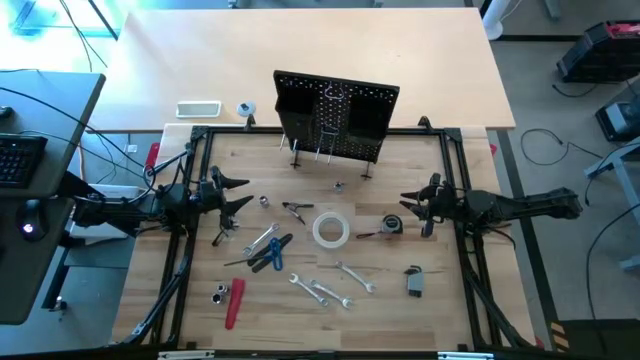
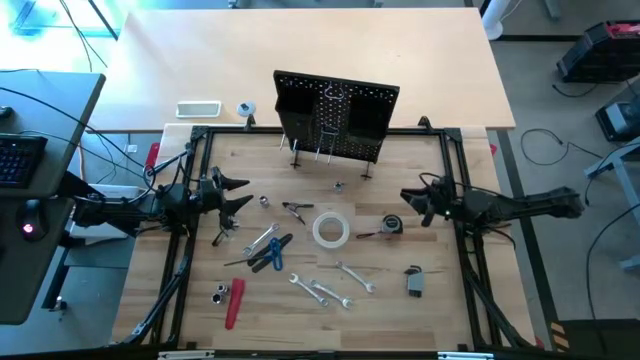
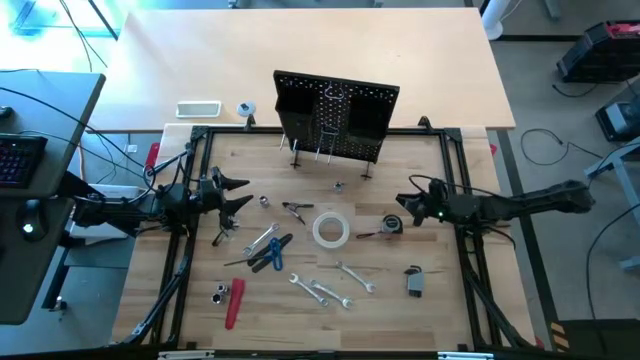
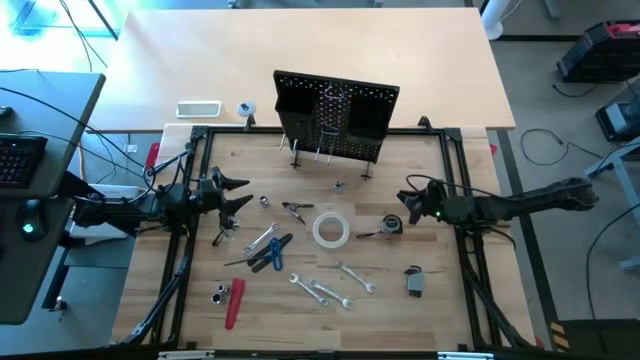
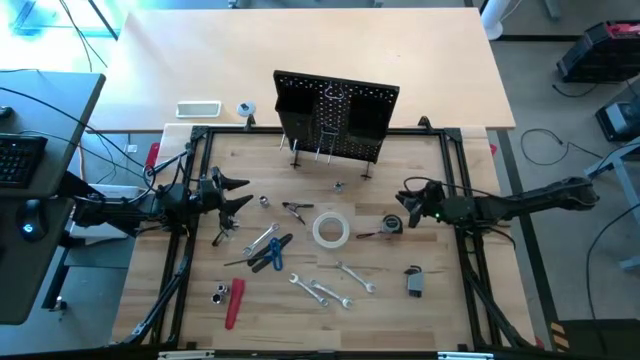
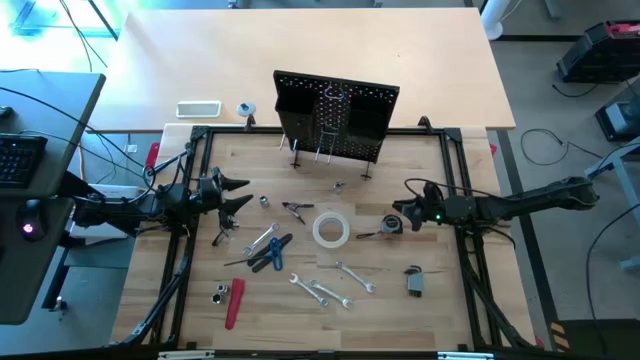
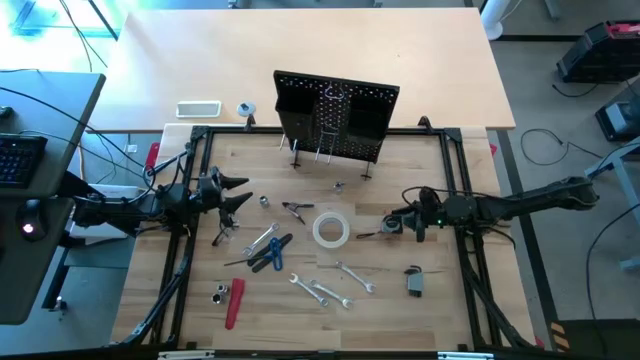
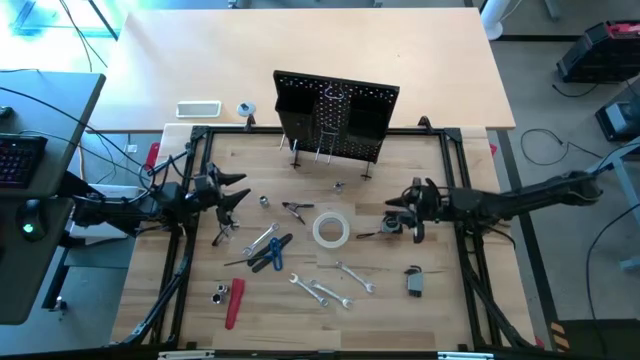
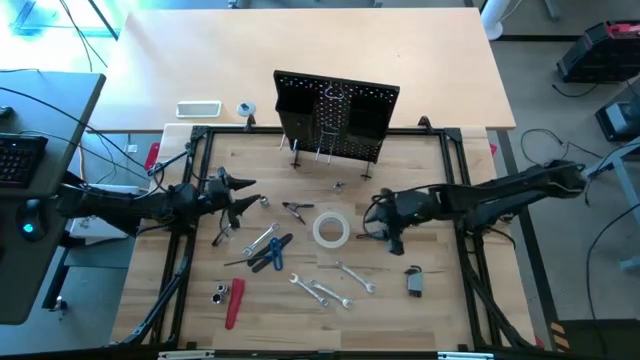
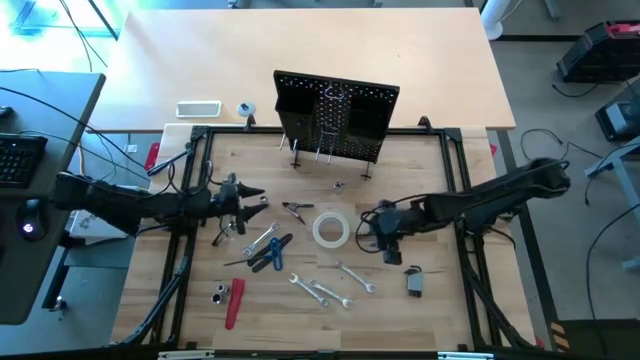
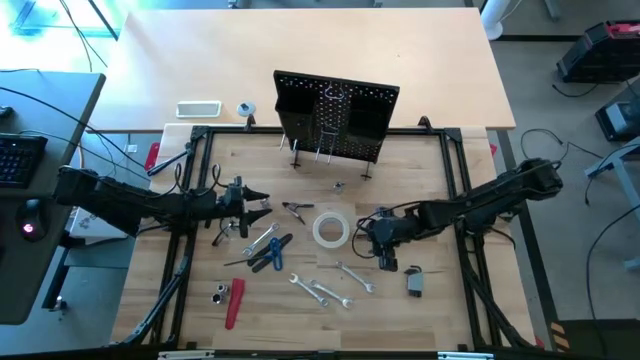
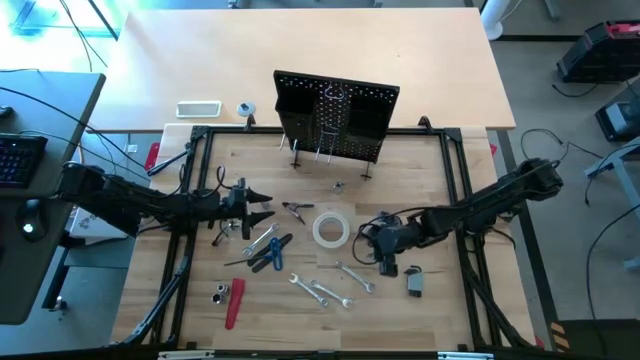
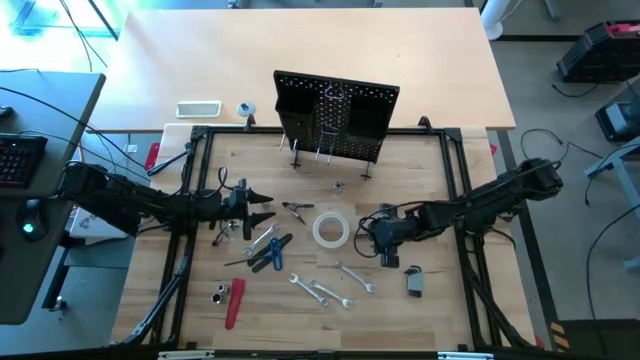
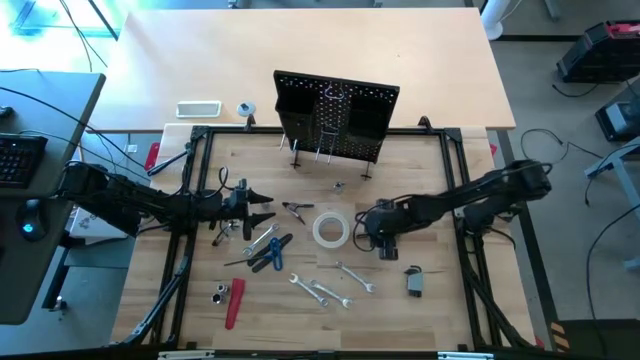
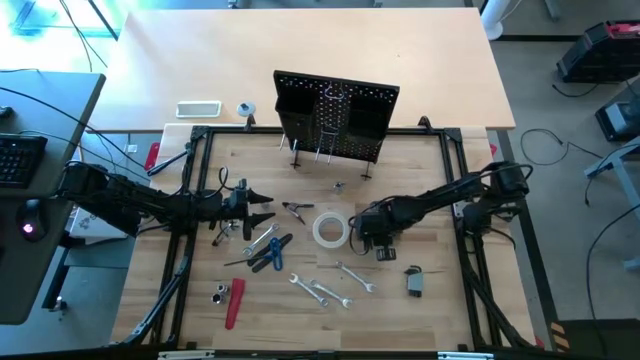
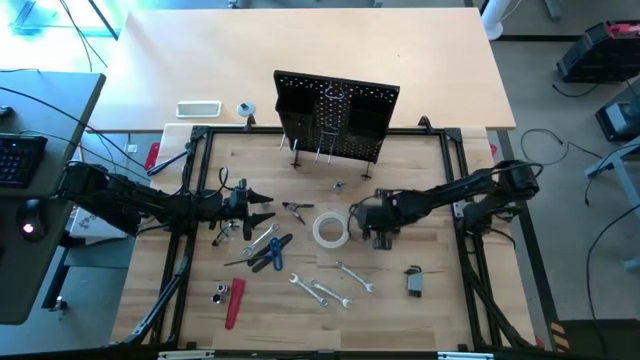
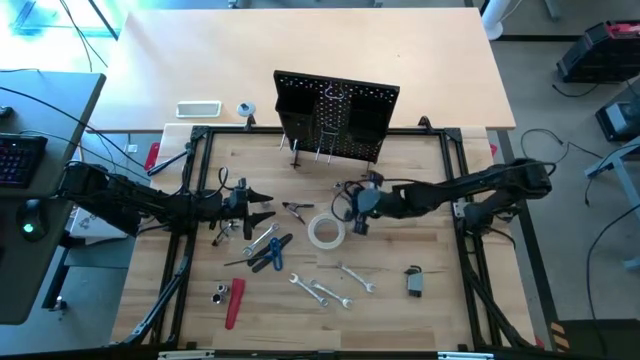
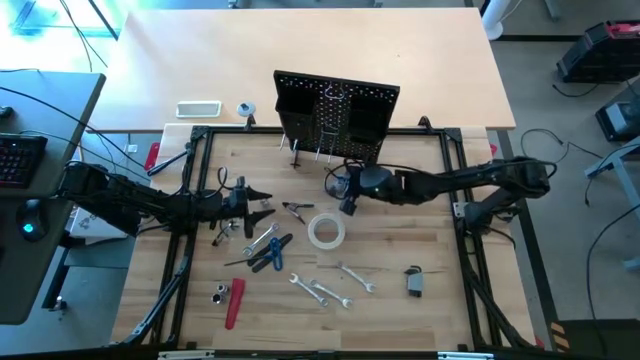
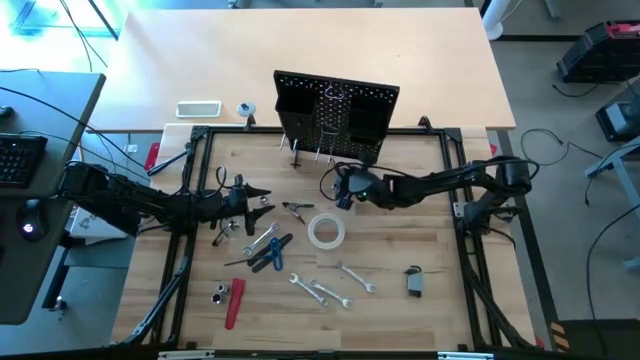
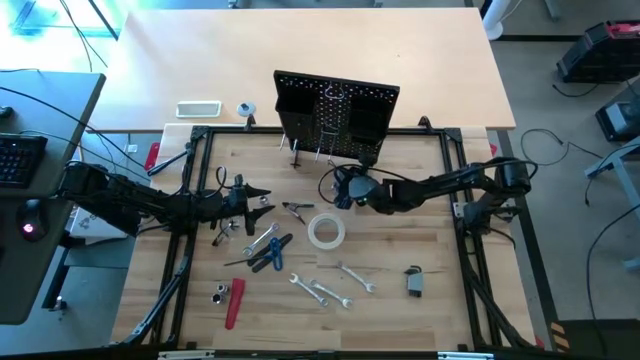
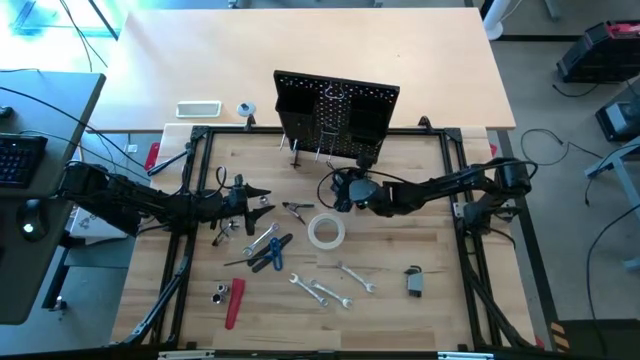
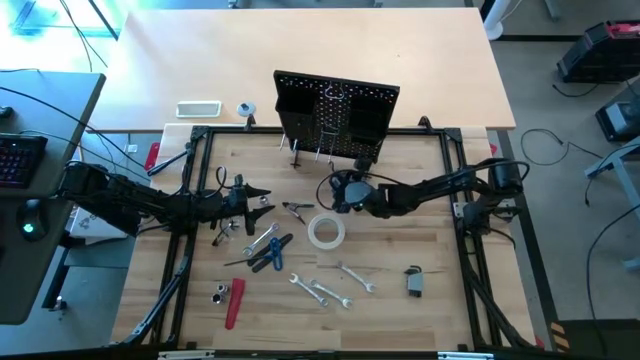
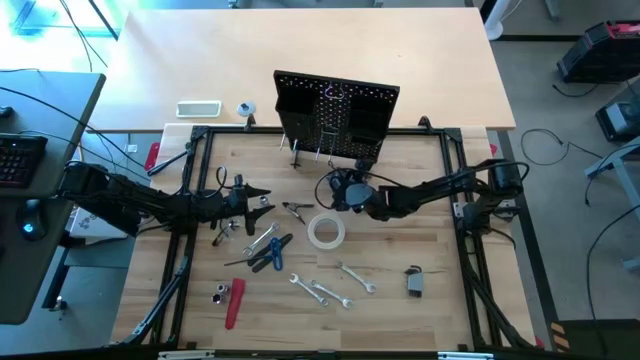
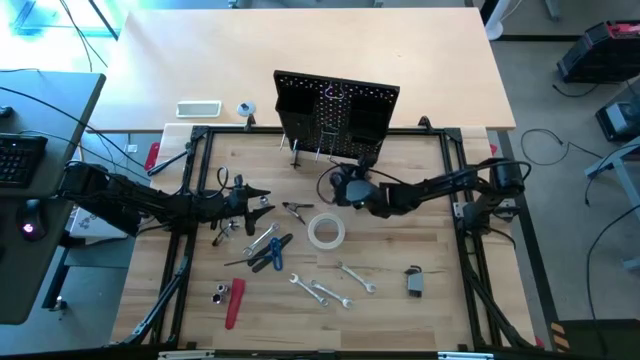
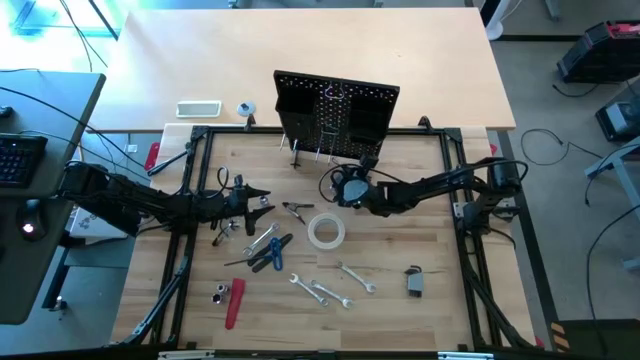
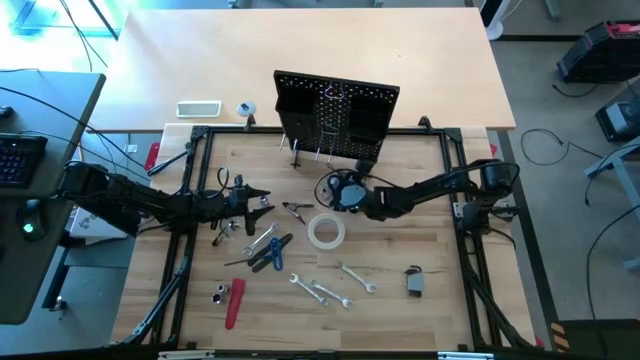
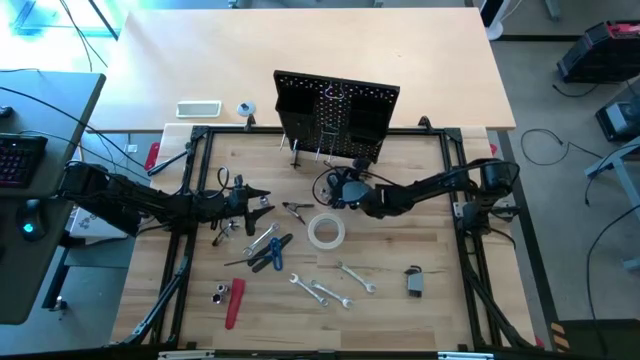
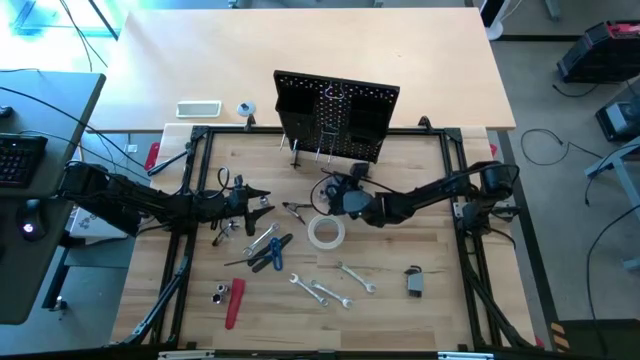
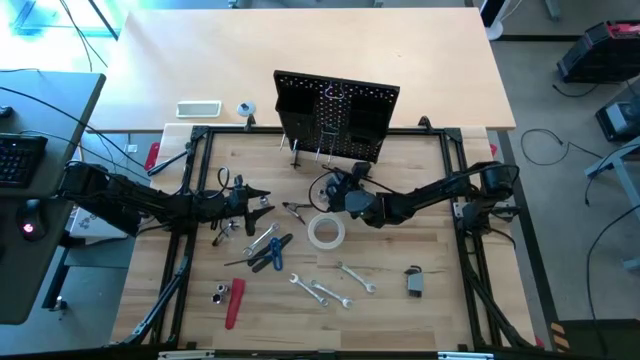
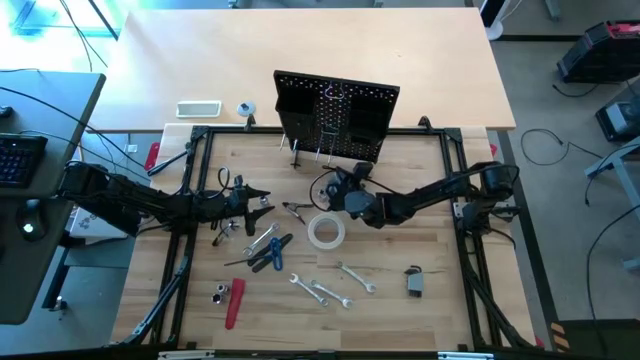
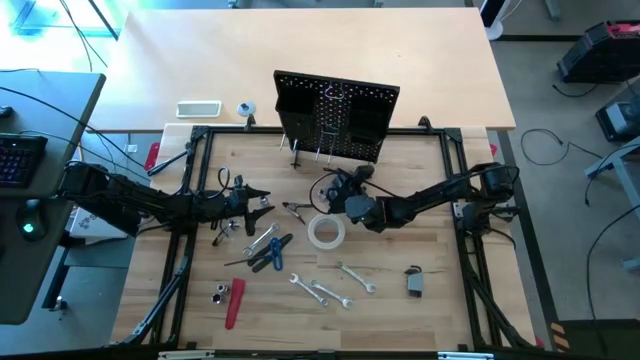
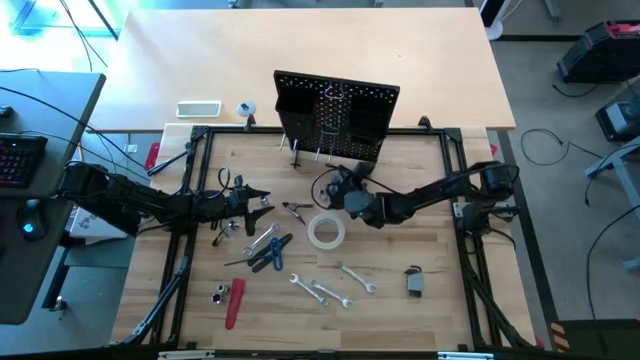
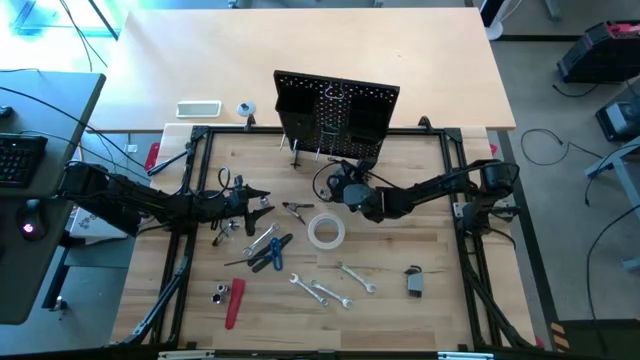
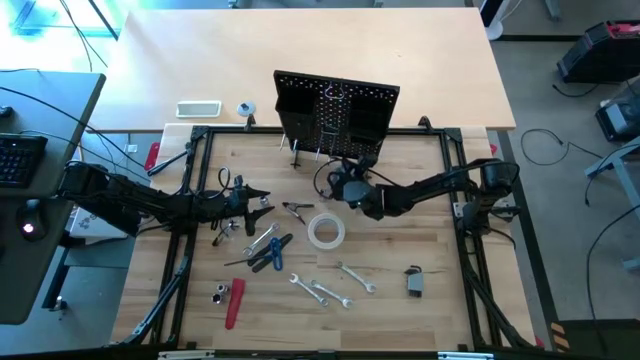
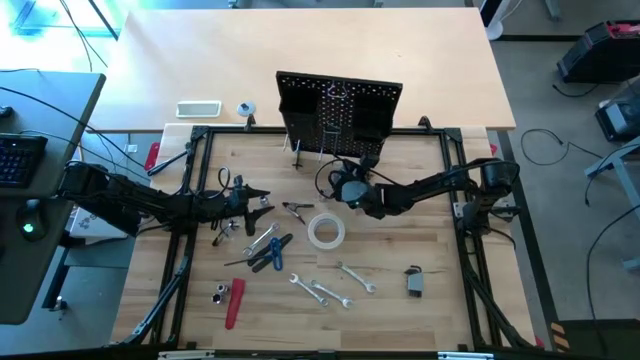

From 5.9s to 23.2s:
Task: Hang tools onto peg board
Hang the gray measuring tape on the peg board

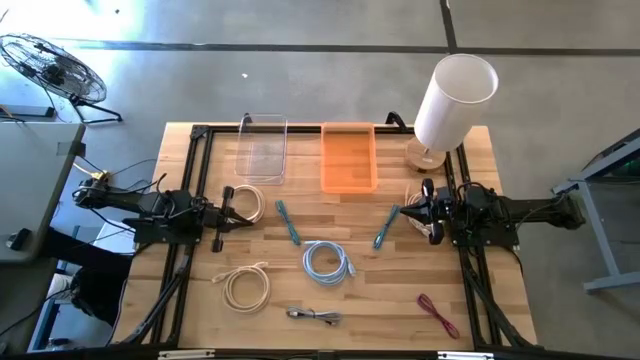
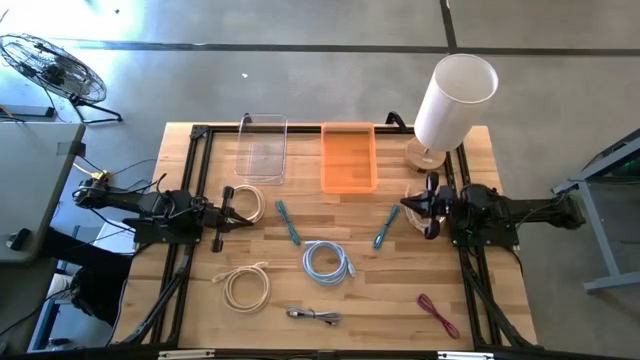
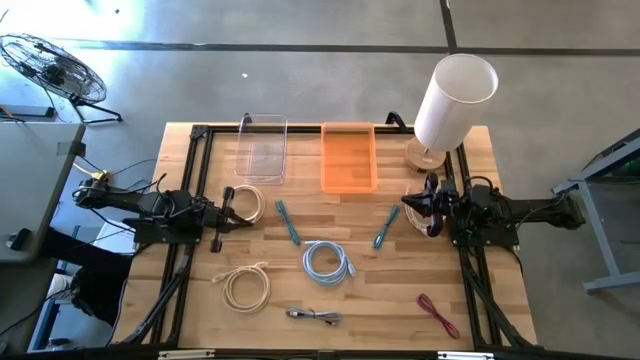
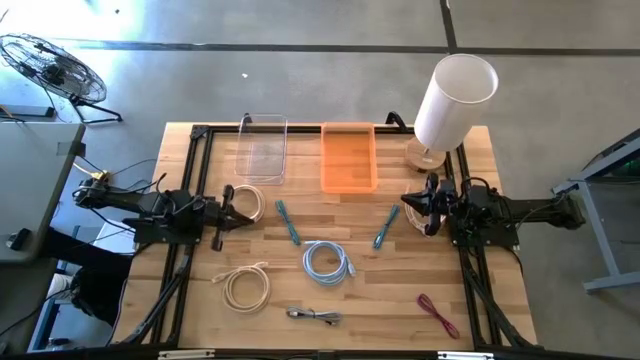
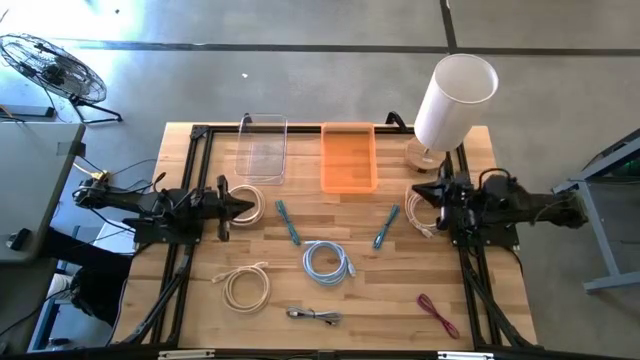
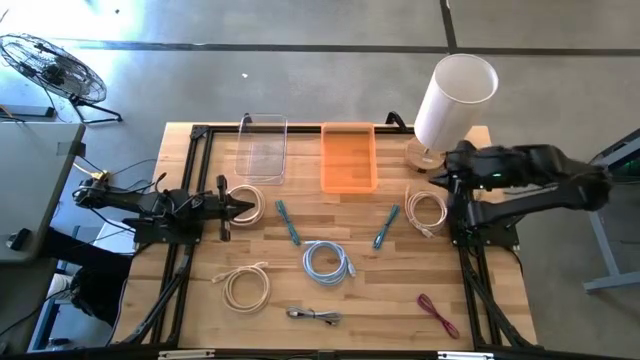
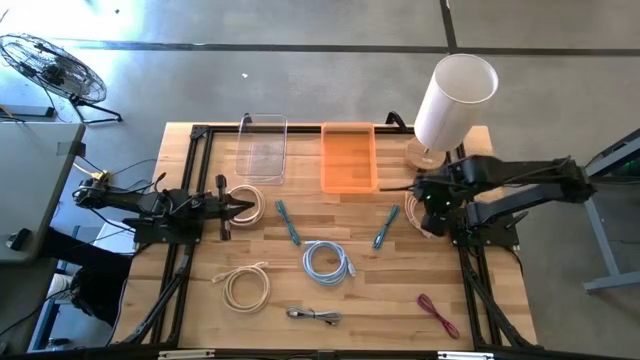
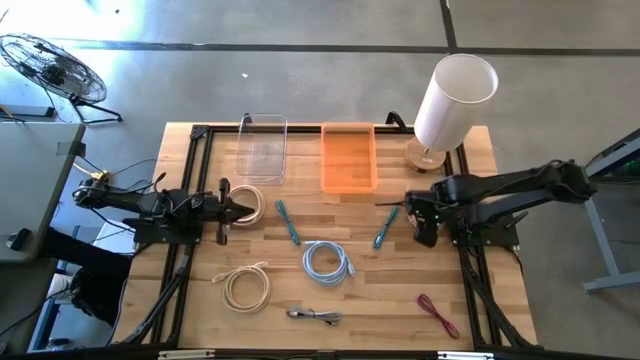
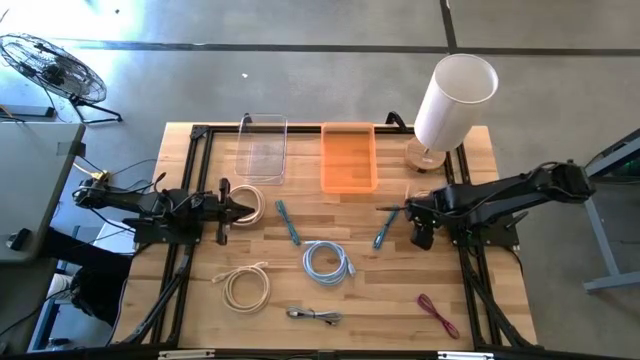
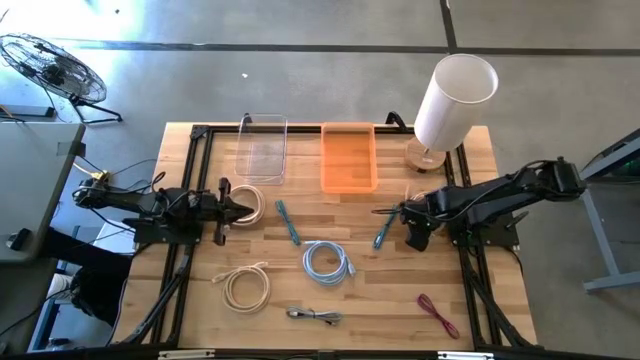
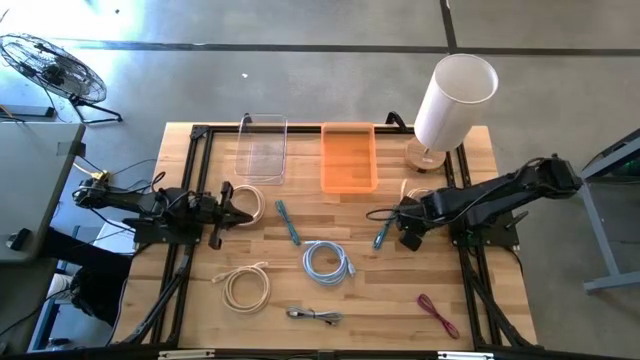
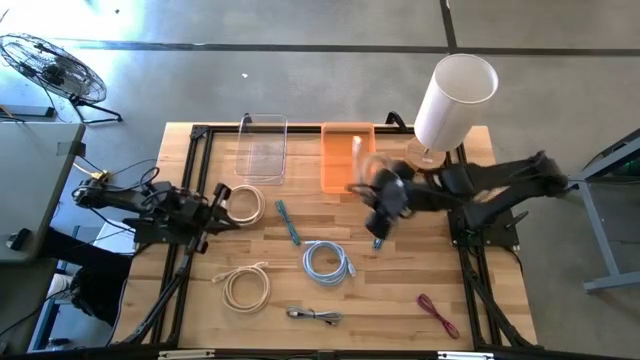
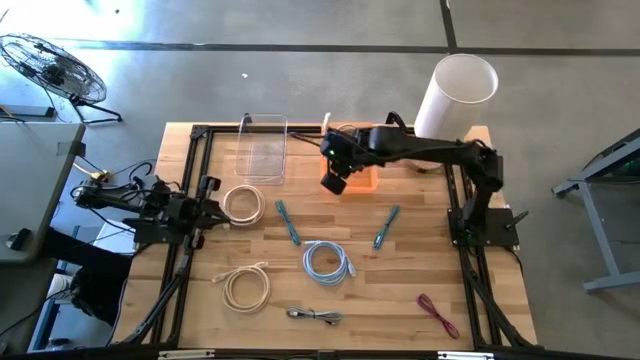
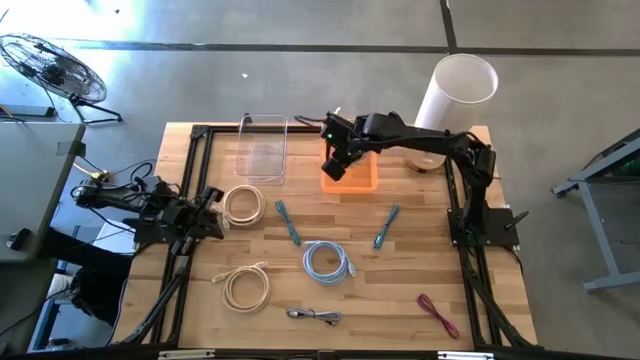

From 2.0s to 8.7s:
Task: Pick & Place USB Port
Put the right white HDMI cable into the orange bin
